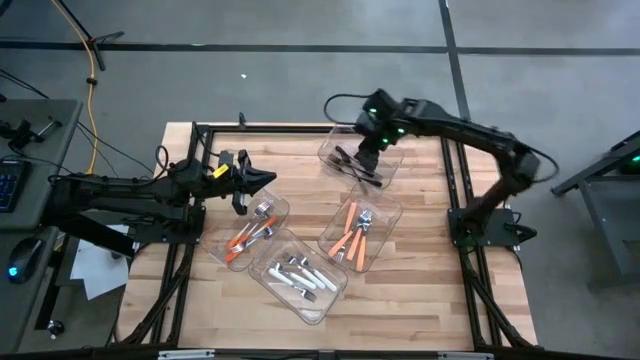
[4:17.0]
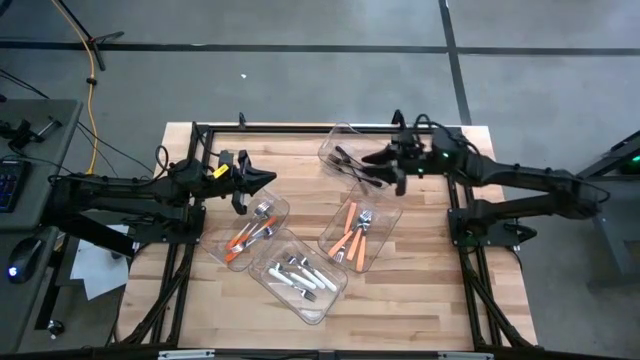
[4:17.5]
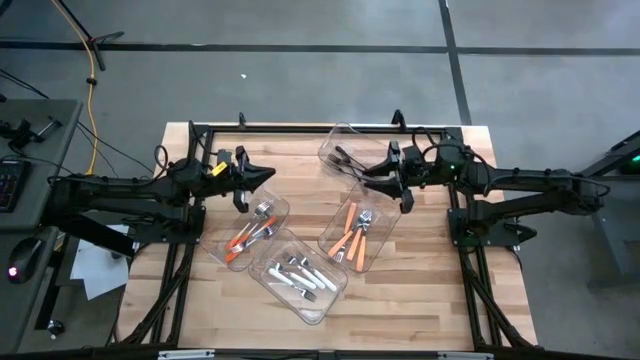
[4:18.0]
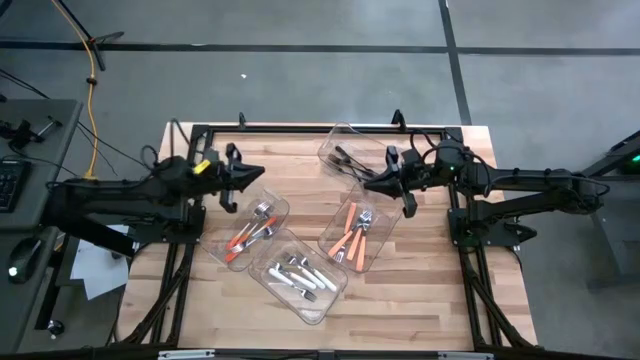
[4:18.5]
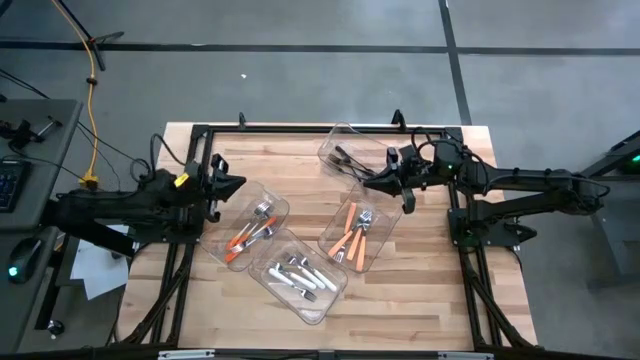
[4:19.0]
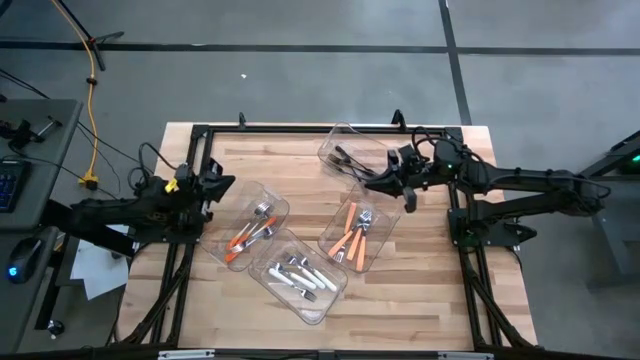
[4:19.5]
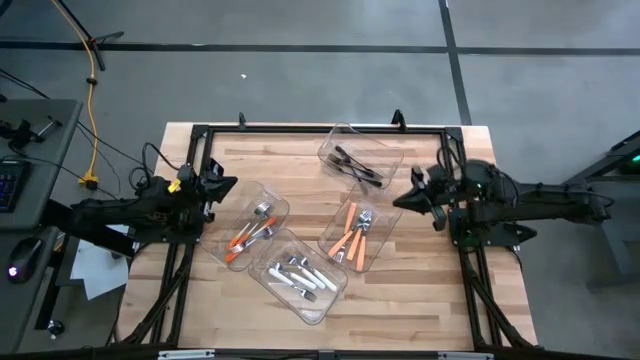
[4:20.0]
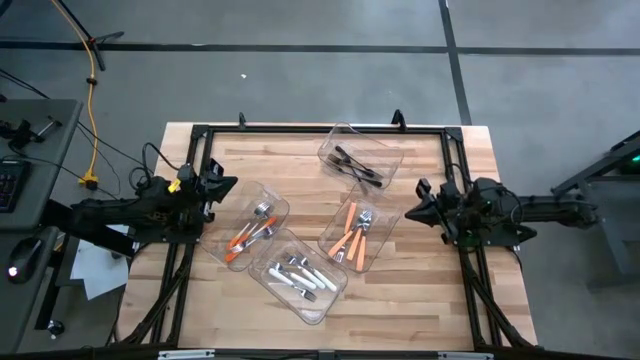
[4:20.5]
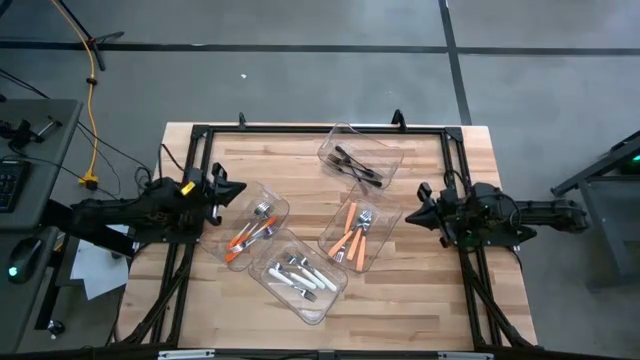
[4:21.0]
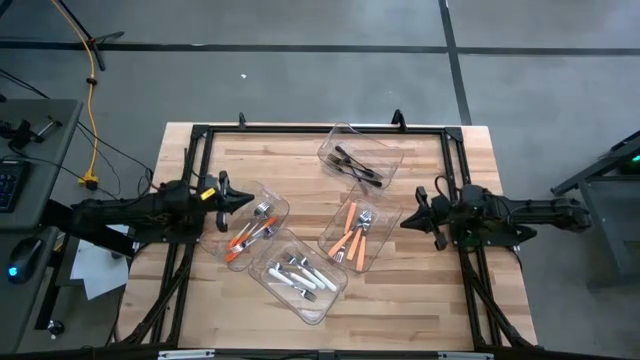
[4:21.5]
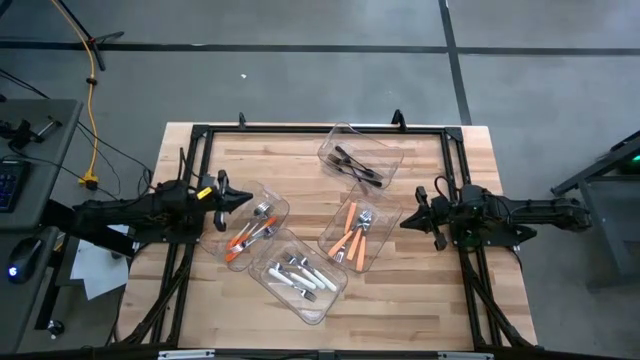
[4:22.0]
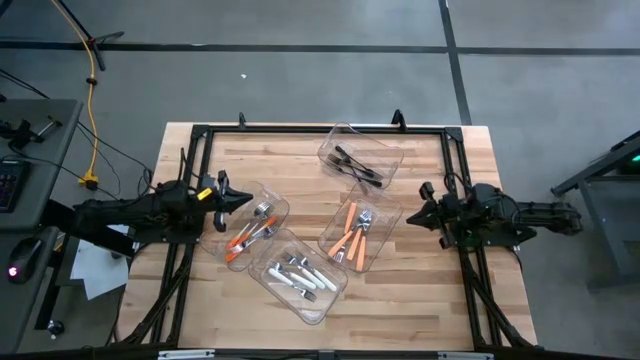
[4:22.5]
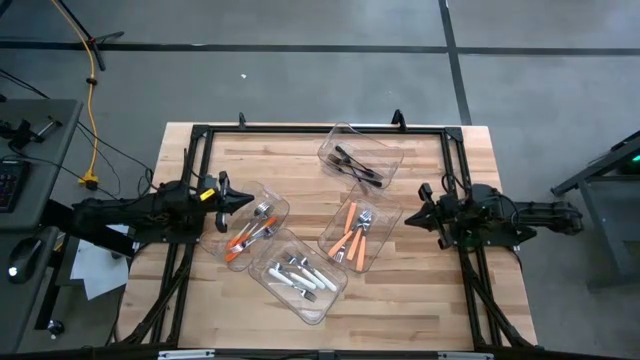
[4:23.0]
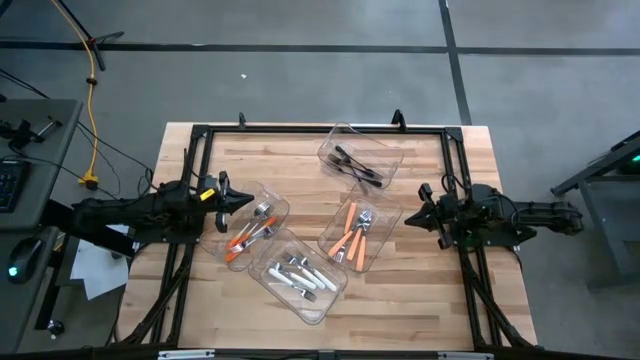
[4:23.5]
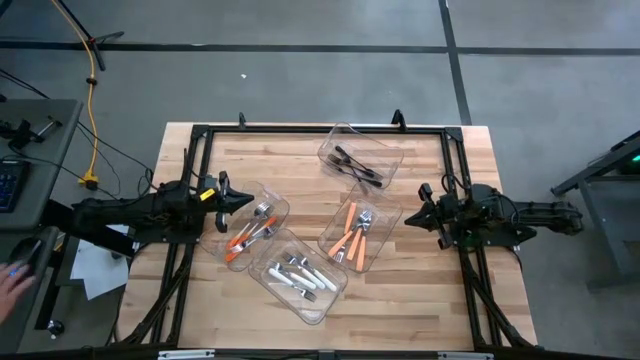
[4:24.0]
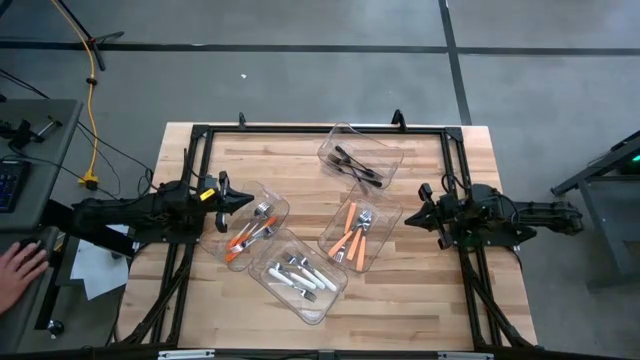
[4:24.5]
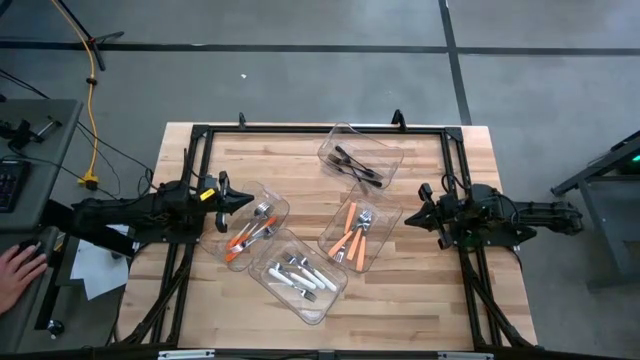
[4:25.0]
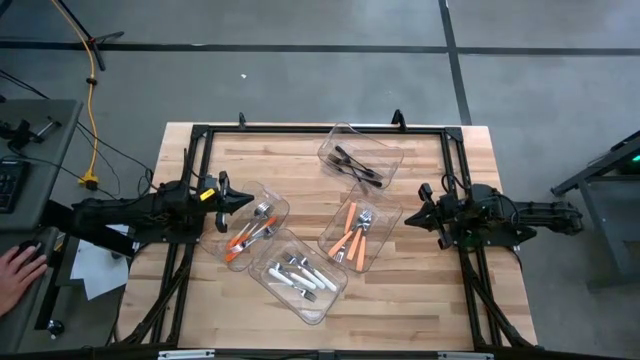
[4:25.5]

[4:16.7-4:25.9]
Task: Sort silverware by color (type)
Return to Home Position

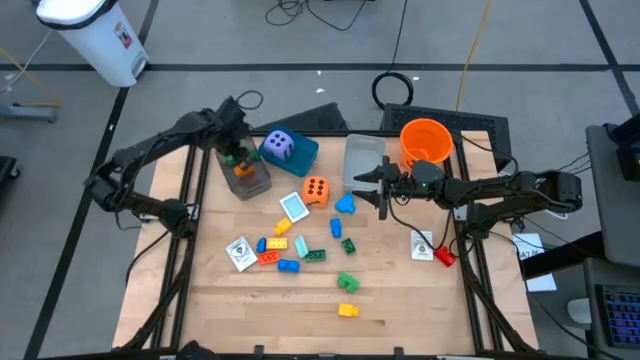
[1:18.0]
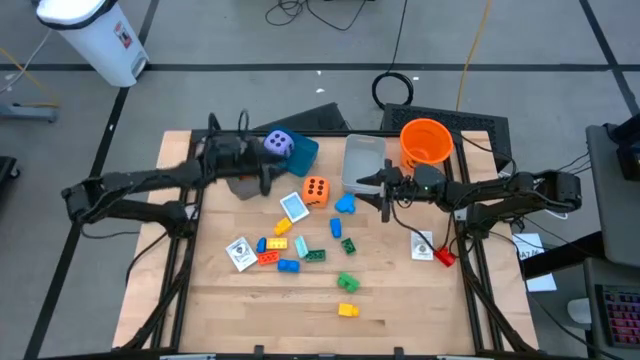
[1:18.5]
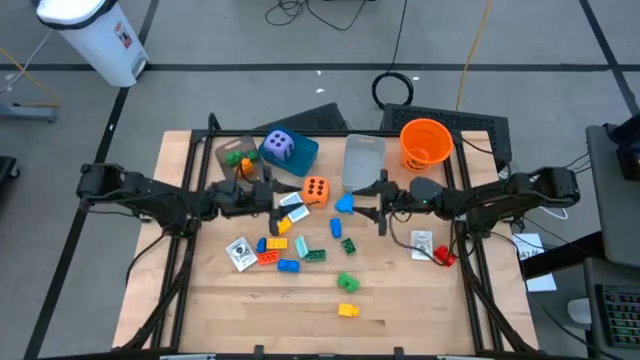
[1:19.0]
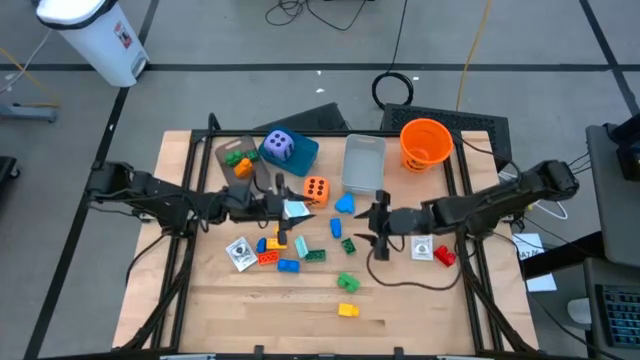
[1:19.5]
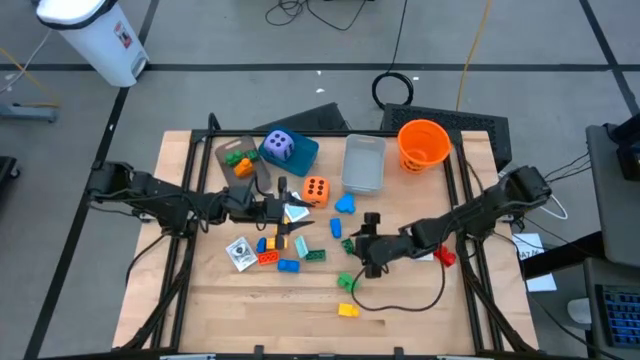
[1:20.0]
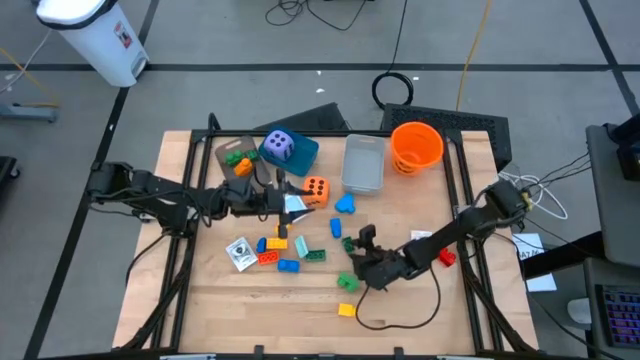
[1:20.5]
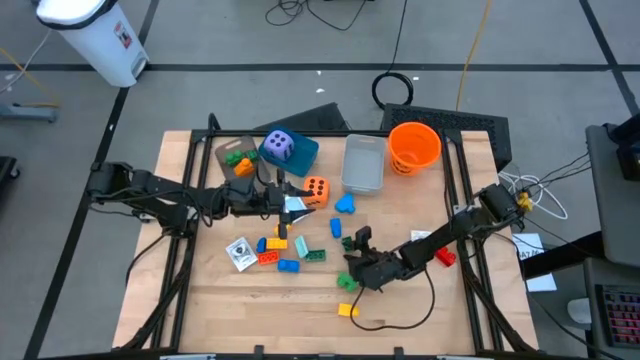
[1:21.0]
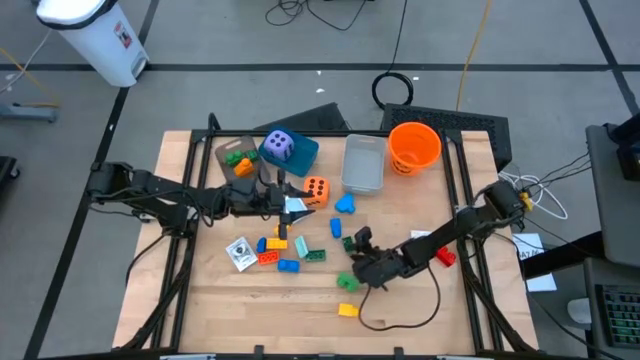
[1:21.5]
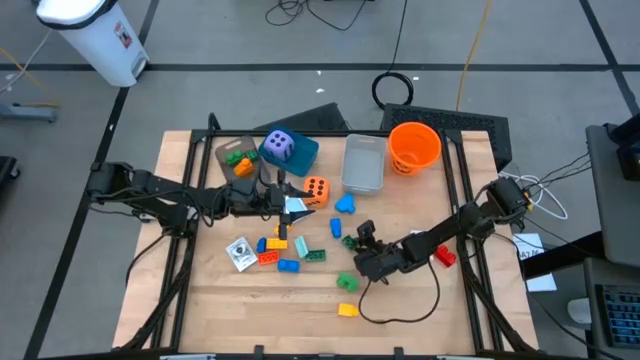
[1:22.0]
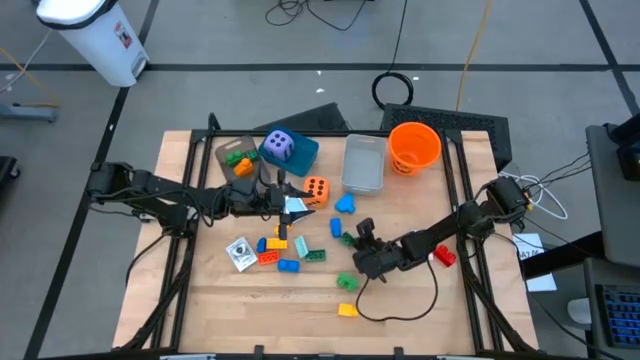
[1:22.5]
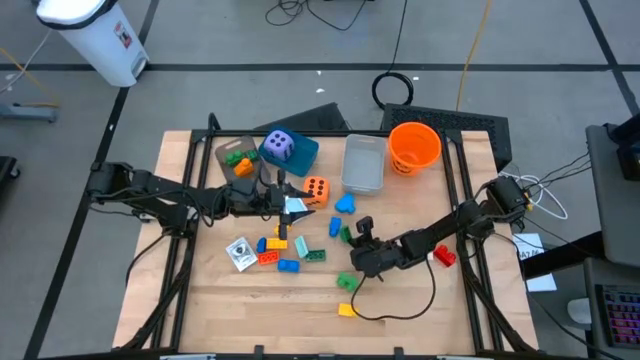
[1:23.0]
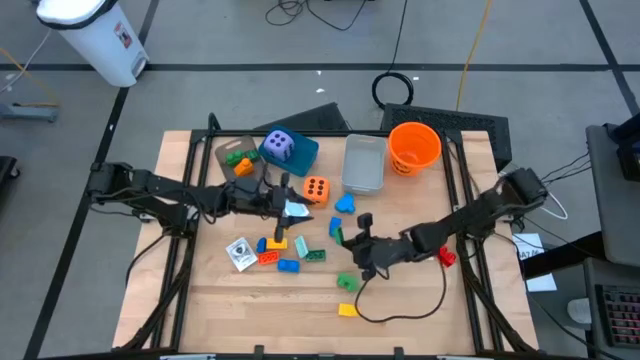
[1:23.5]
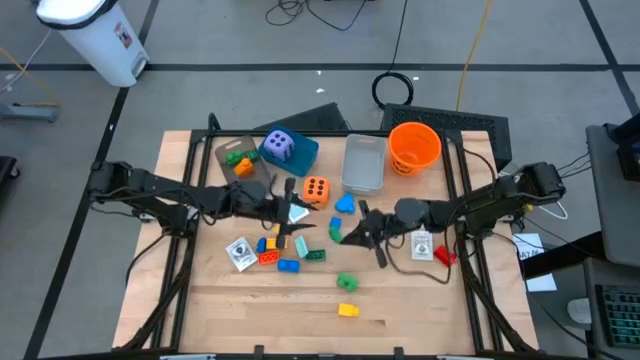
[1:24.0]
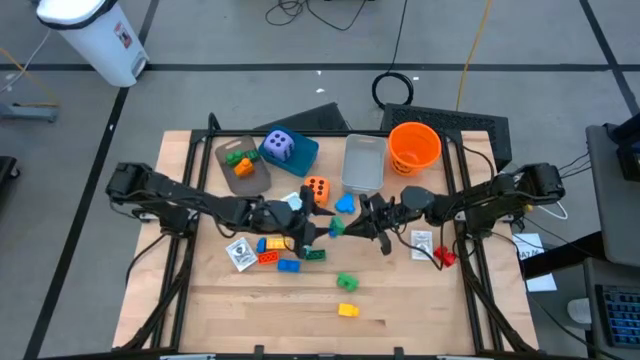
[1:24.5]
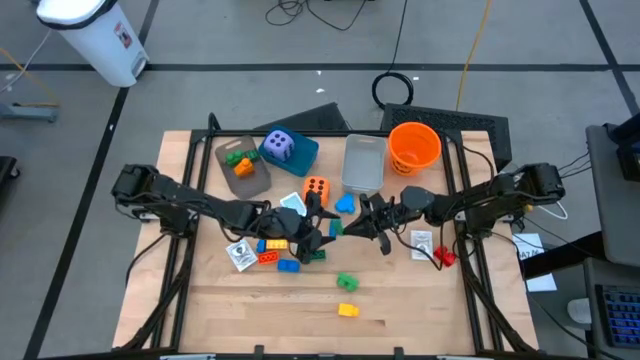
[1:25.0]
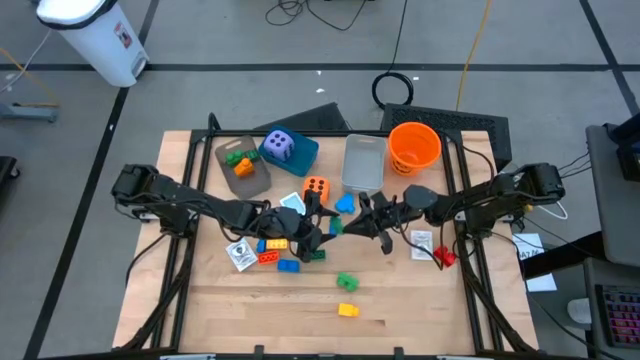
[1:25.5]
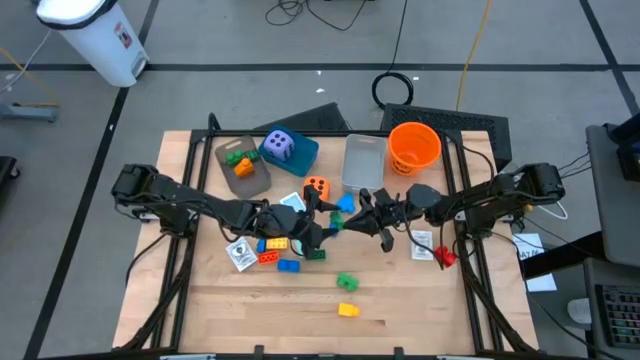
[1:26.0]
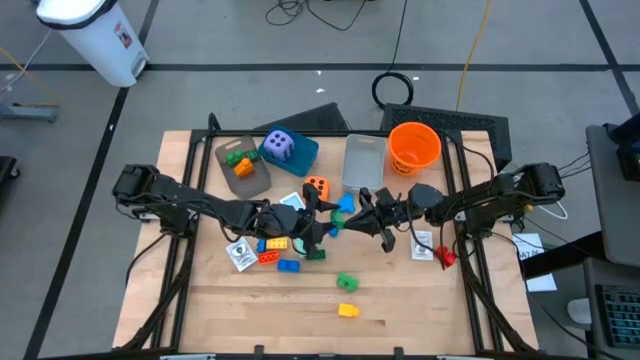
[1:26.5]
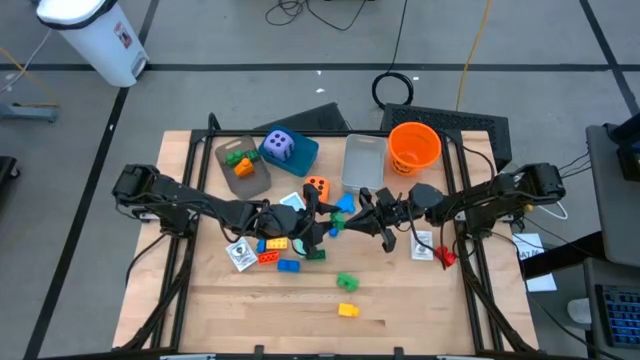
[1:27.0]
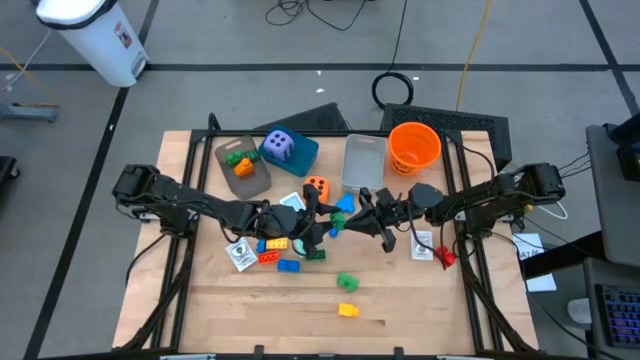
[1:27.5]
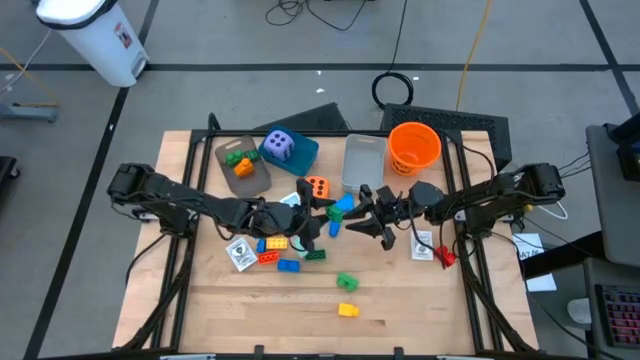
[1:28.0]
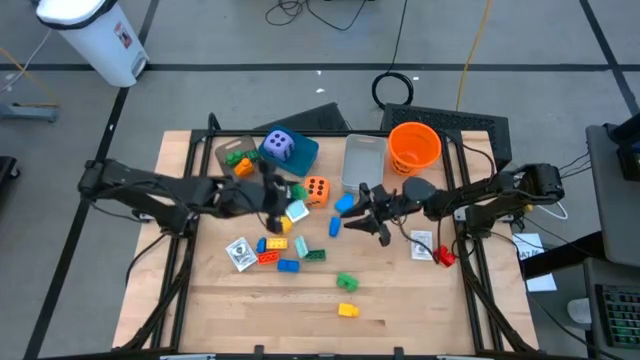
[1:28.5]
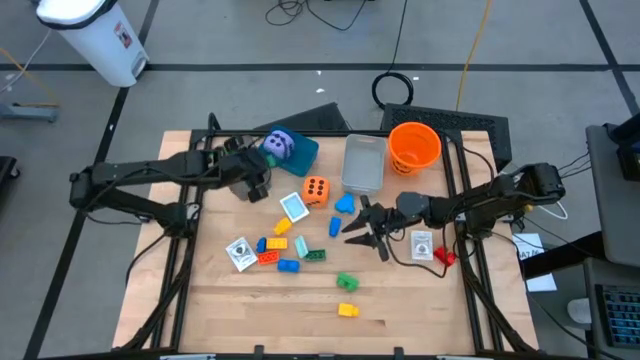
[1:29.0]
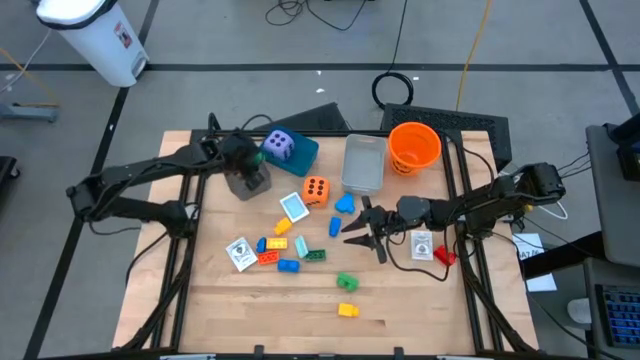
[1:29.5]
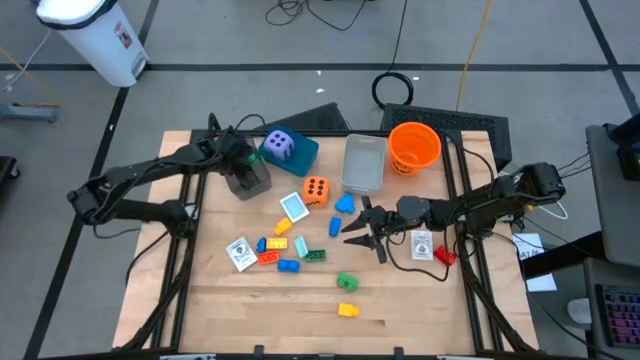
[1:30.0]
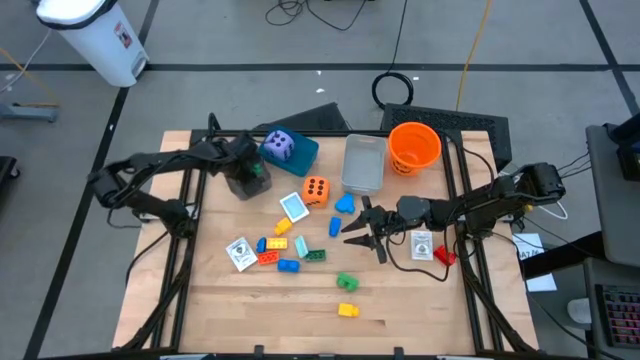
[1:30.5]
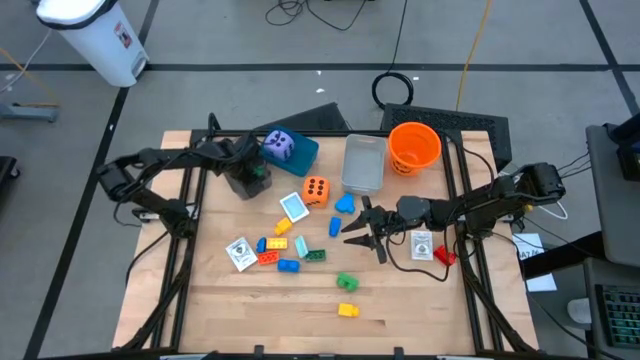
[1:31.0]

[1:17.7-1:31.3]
Task: Pick & Place Toys
Put the green game piece into the black bin
